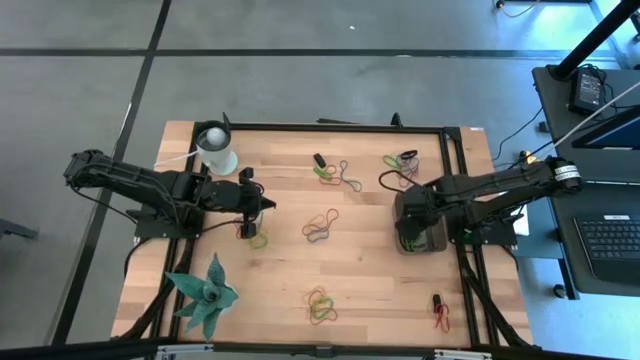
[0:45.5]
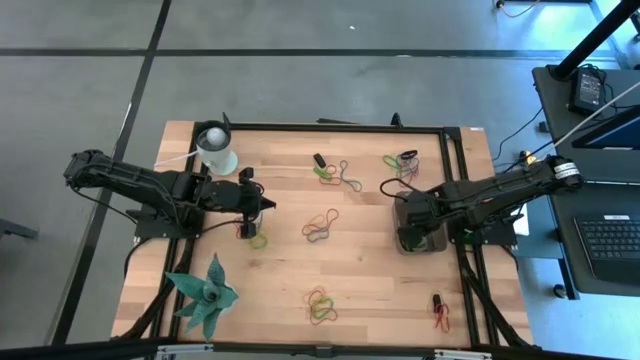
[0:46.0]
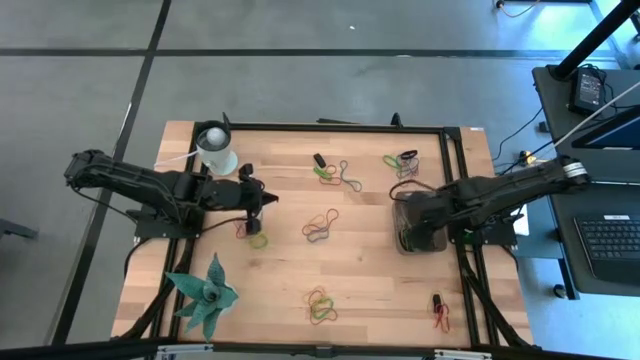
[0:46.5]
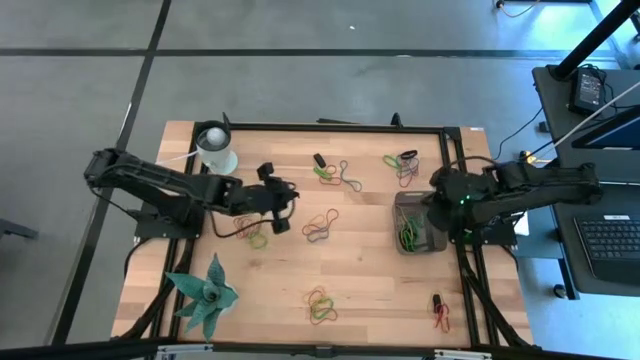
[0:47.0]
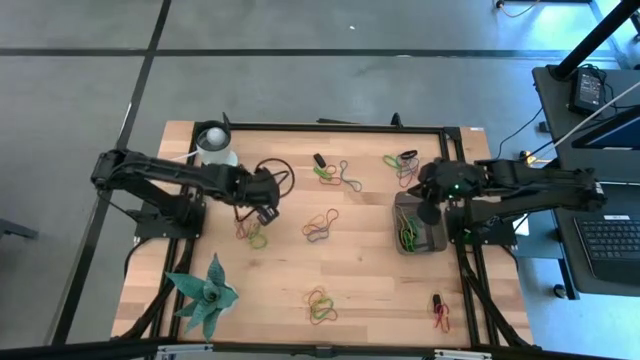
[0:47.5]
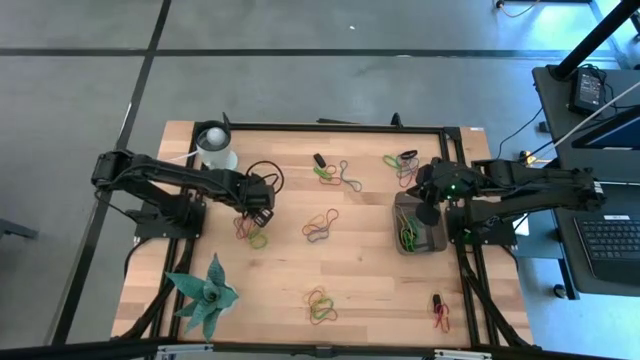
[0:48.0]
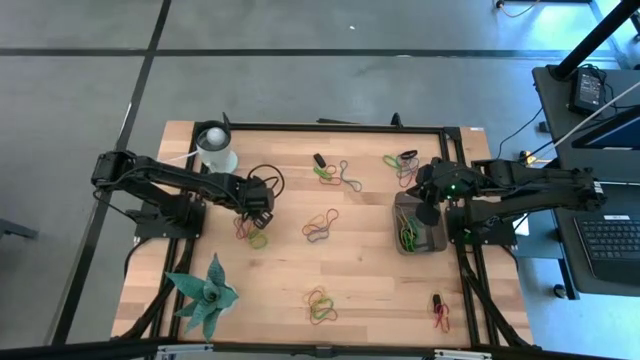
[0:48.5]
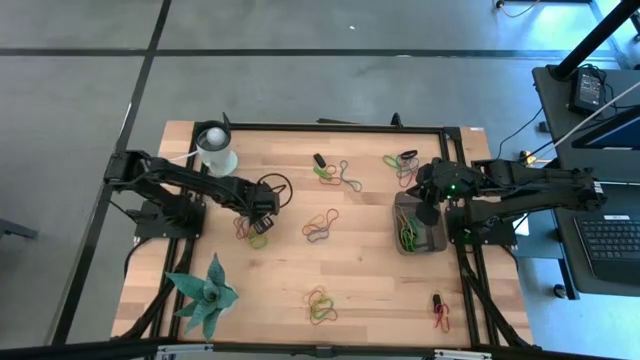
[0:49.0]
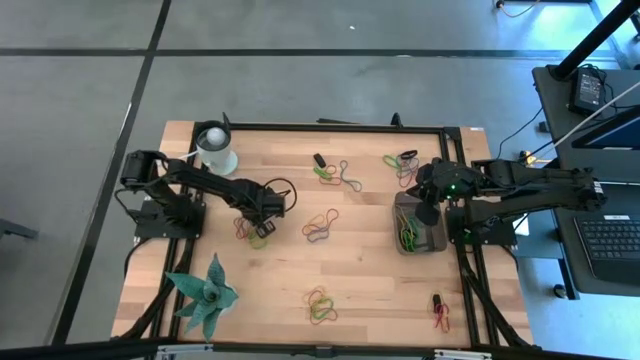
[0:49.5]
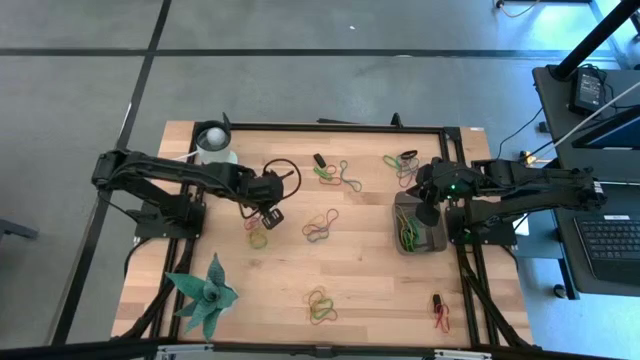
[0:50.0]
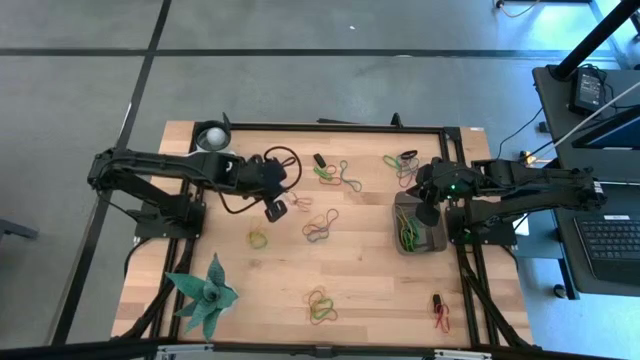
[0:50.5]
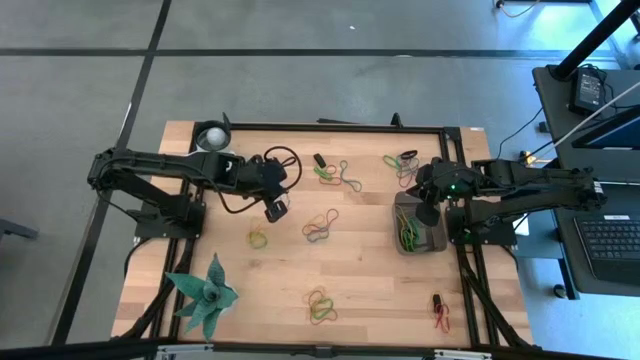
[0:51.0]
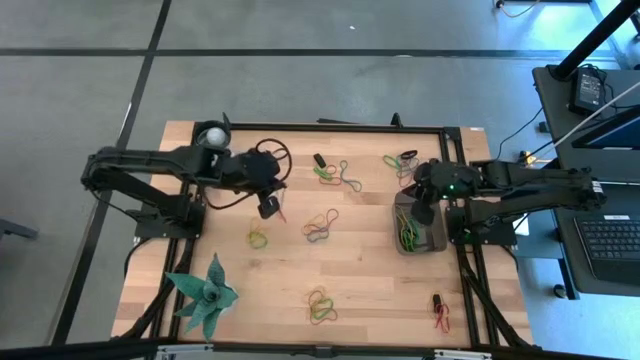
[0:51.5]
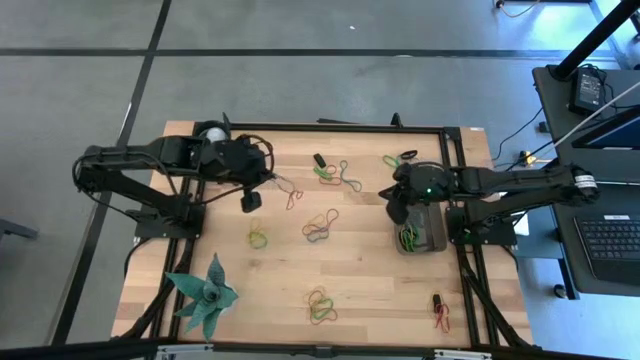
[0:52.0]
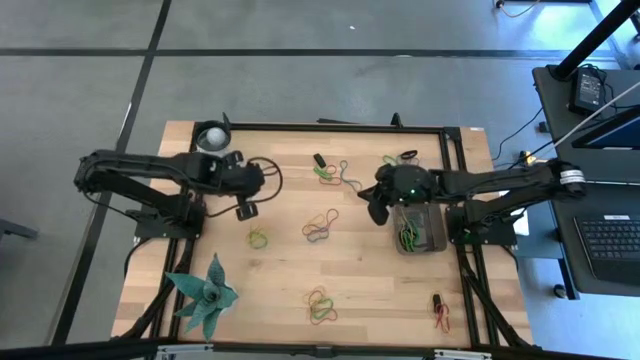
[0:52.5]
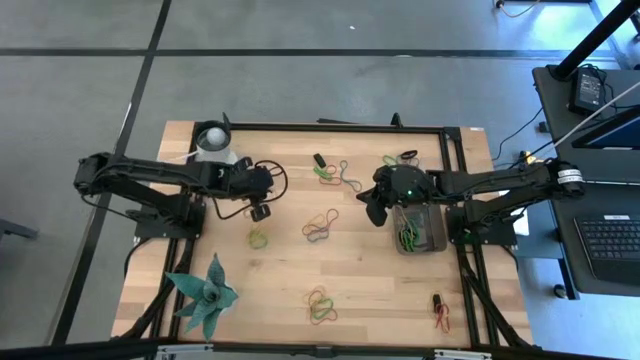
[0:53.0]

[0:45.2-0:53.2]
Task: Pick and place rubber bands into bin
Put the blue rubber band into the black bin

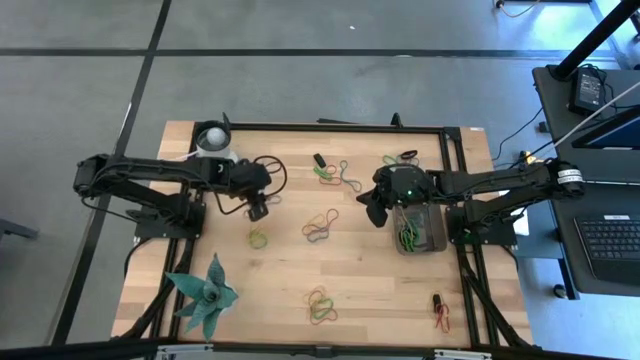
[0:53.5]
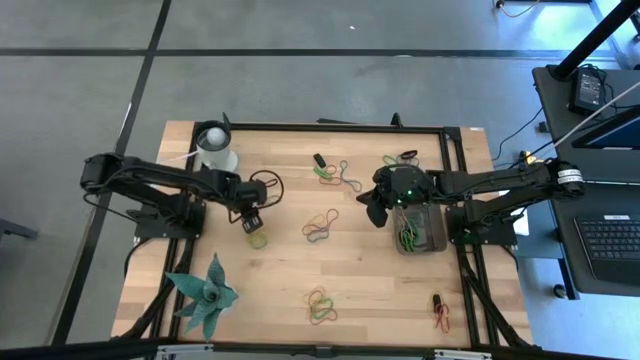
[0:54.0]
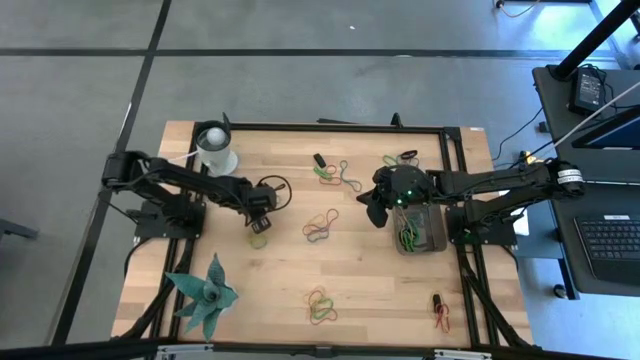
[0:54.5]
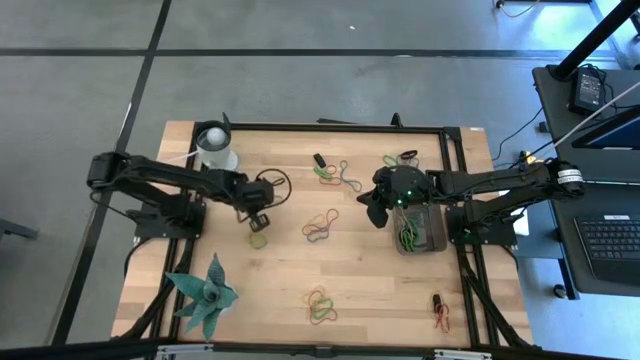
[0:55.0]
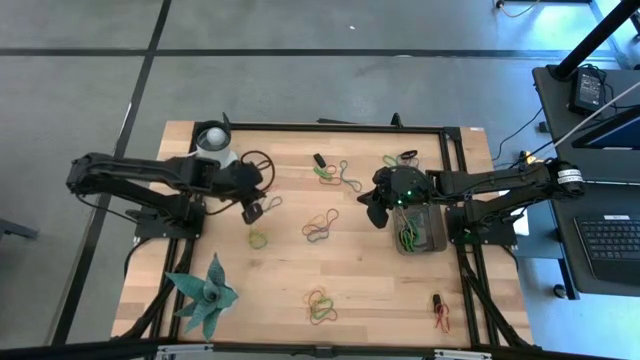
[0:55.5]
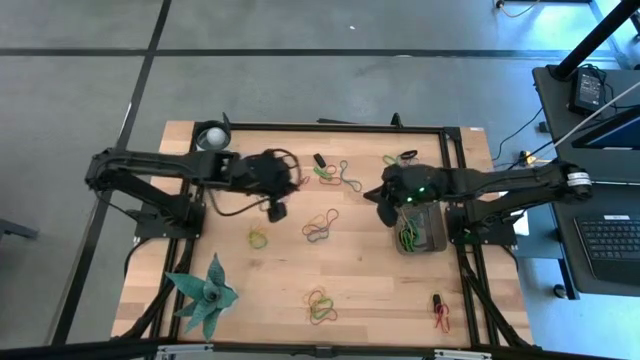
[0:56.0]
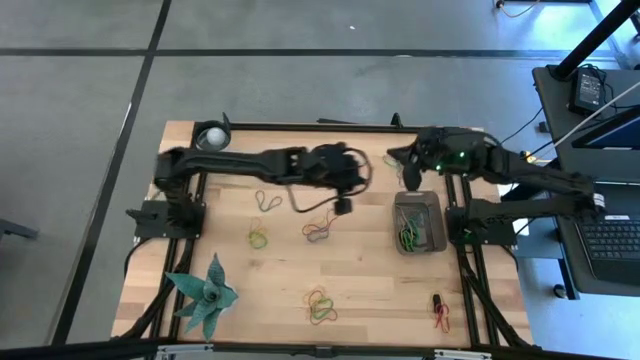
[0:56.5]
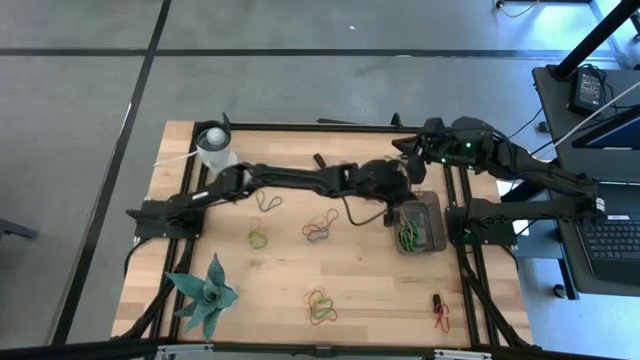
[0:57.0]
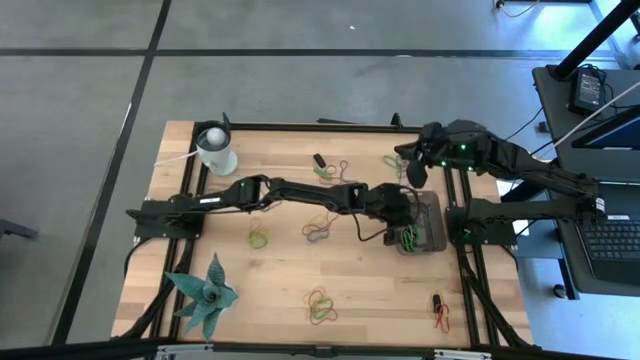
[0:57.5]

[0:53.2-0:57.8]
Put the red rubber band into the black bin

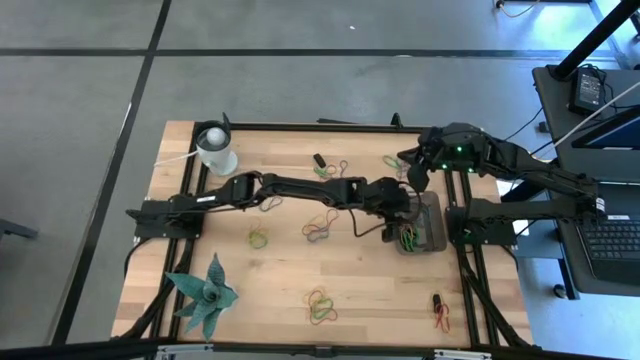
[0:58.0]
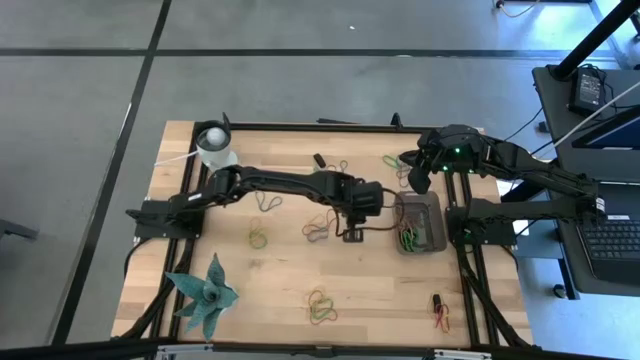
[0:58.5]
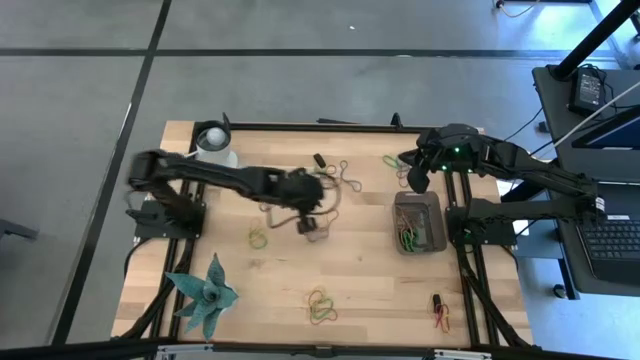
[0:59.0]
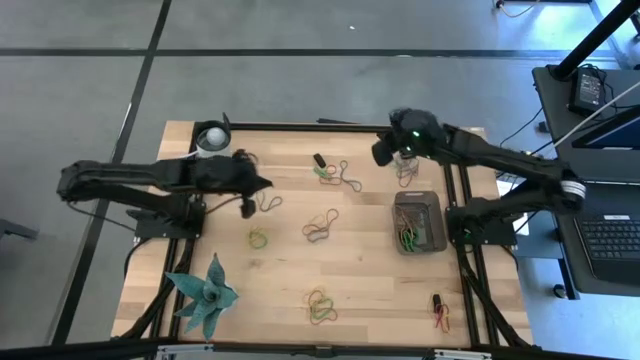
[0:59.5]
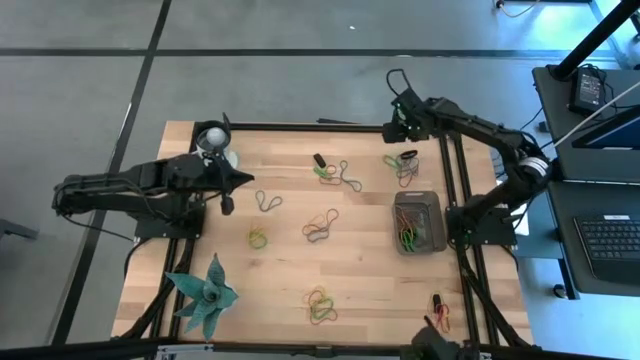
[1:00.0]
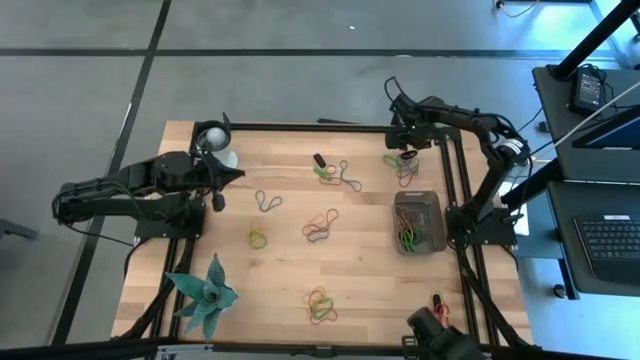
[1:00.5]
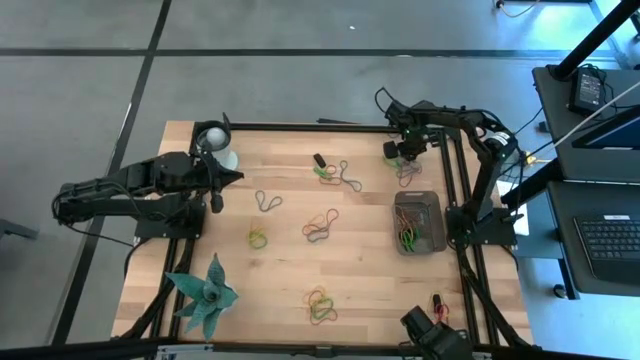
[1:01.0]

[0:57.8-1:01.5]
Put the black rubber band into the black bin

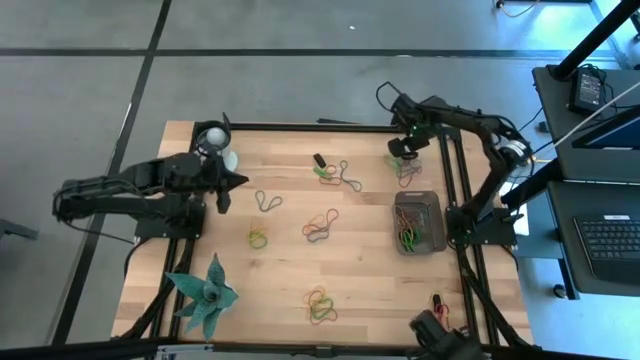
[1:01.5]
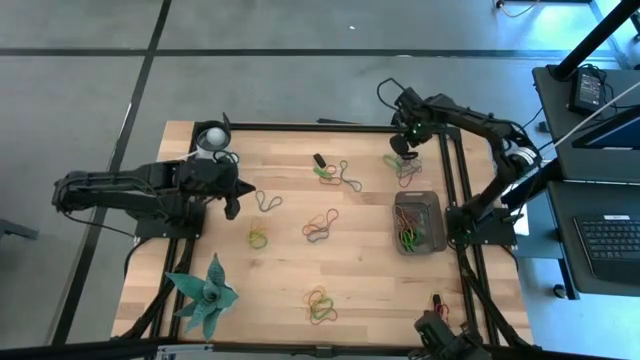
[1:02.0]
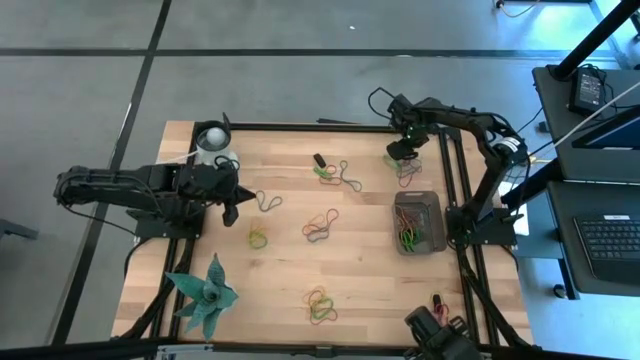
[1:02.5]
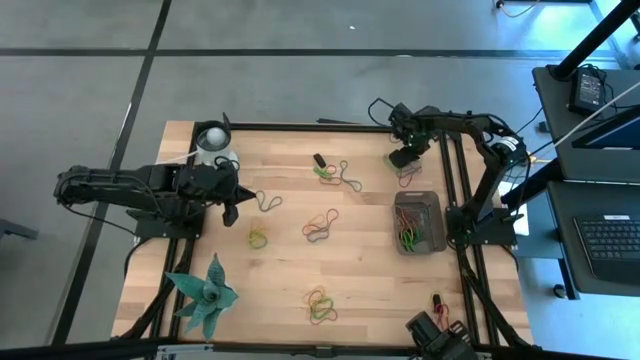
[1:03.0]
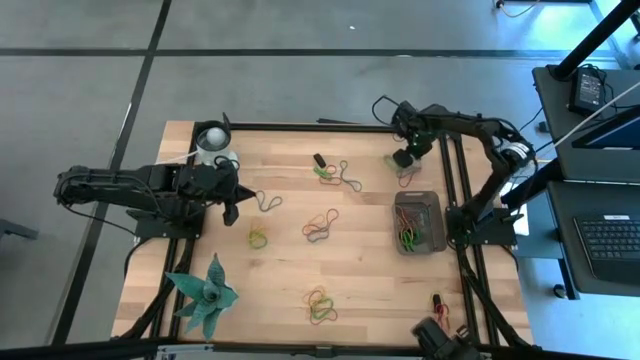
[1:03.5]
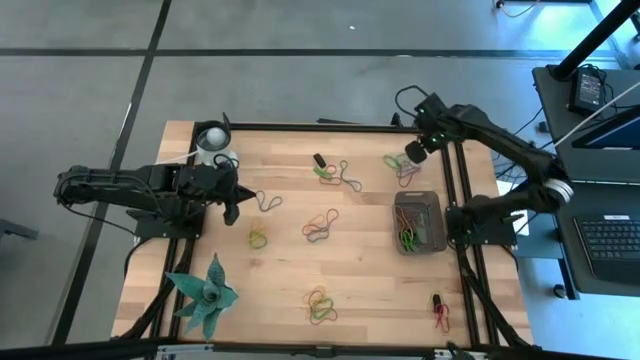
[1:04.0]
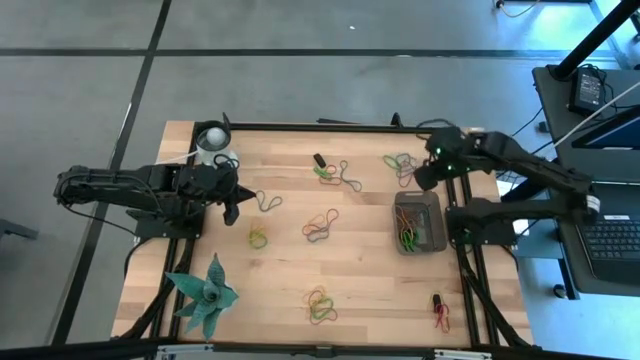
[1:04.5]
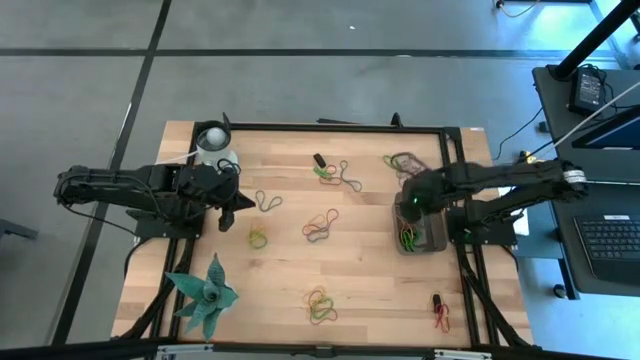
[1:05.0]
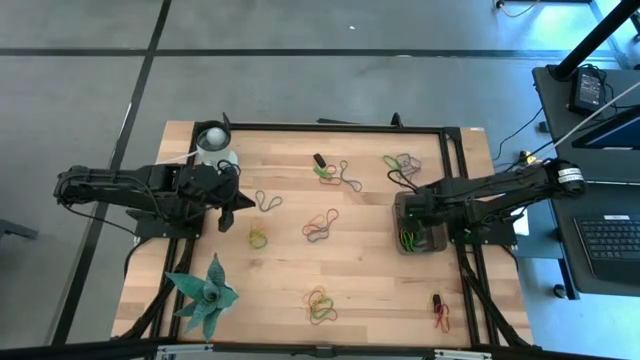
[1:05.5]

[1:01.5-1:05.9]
Put the black rubber band into the black bin
